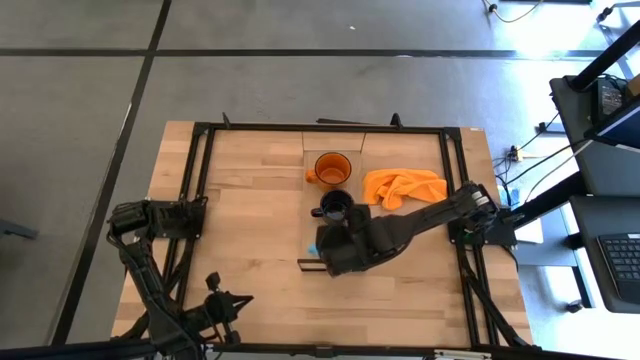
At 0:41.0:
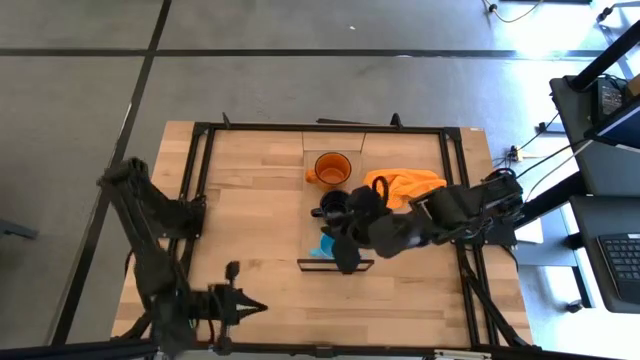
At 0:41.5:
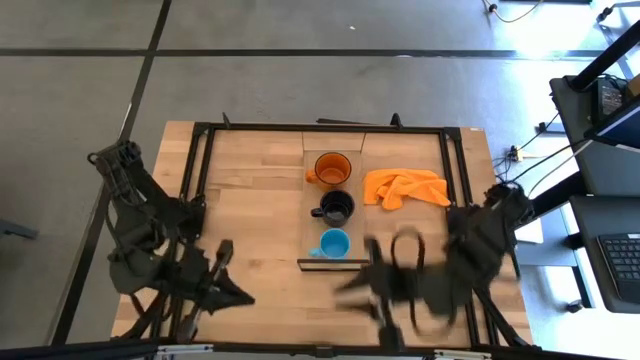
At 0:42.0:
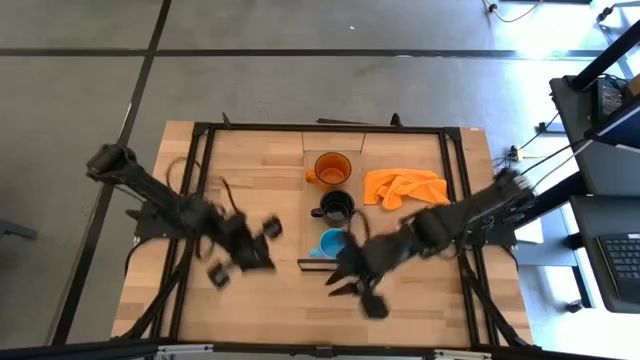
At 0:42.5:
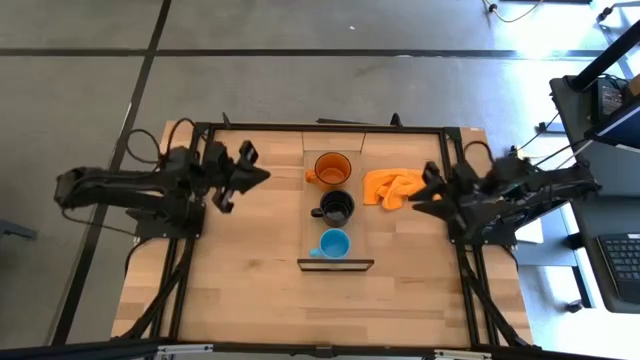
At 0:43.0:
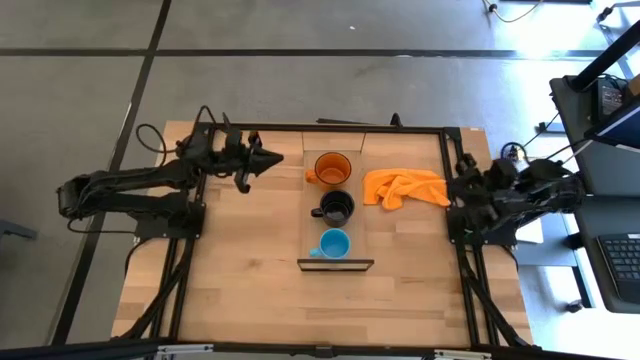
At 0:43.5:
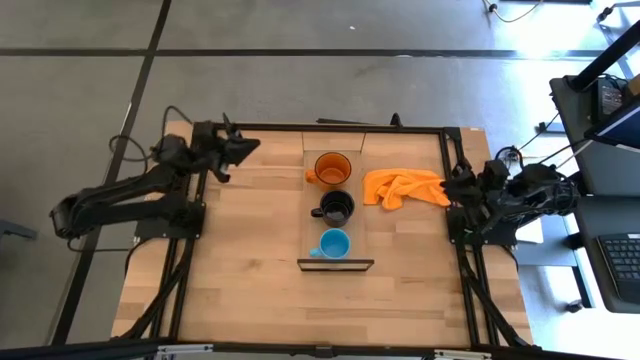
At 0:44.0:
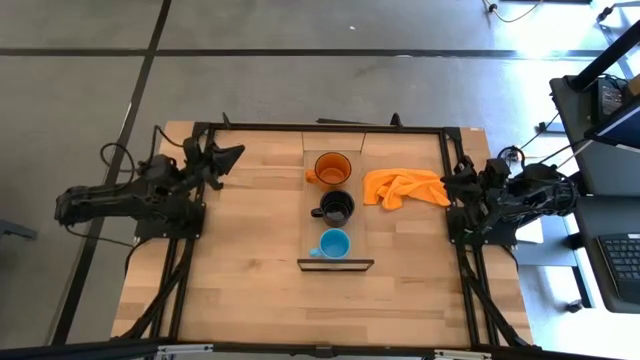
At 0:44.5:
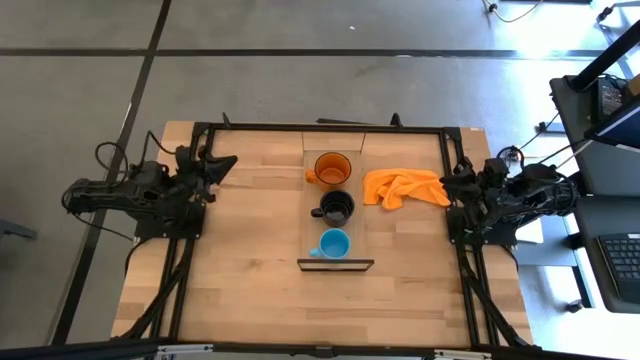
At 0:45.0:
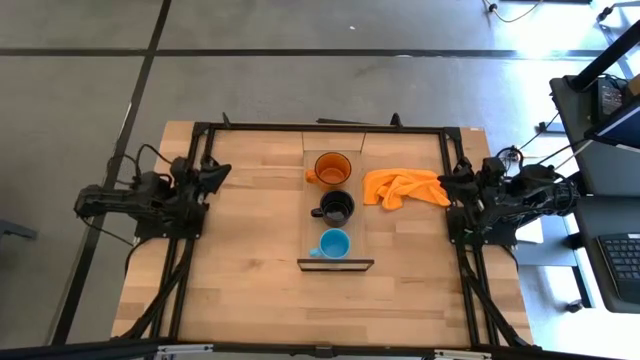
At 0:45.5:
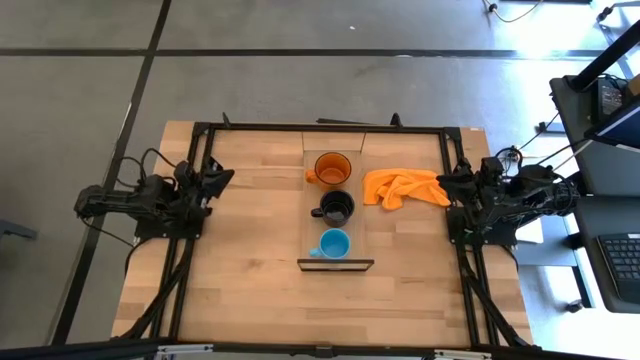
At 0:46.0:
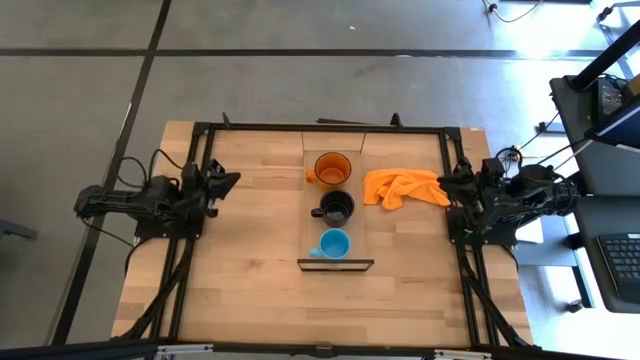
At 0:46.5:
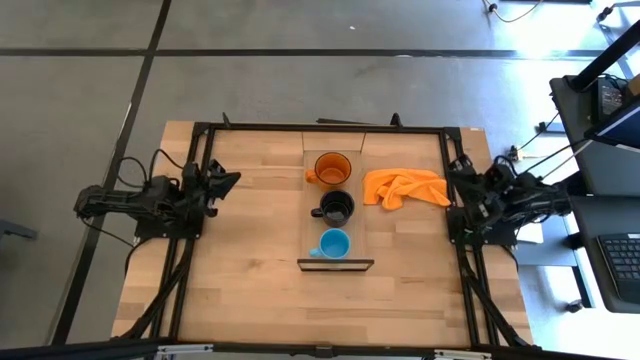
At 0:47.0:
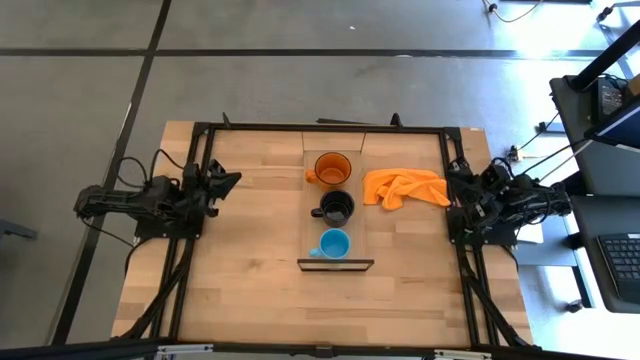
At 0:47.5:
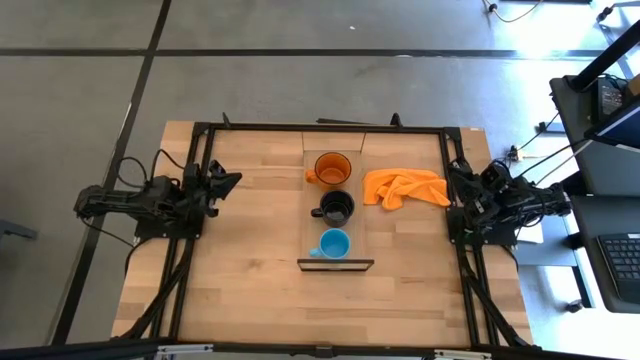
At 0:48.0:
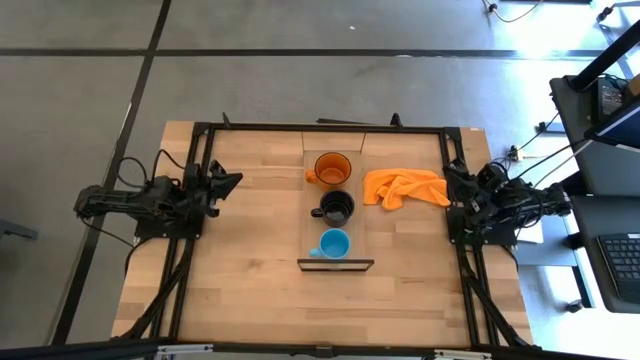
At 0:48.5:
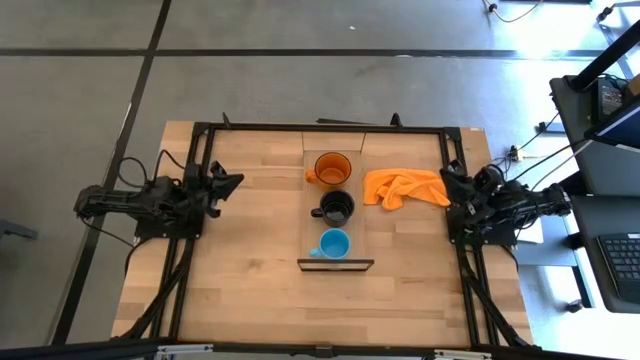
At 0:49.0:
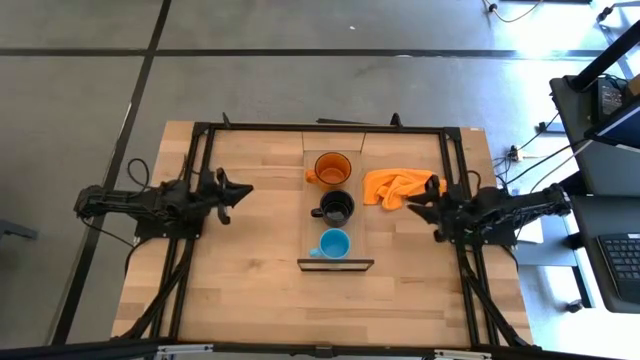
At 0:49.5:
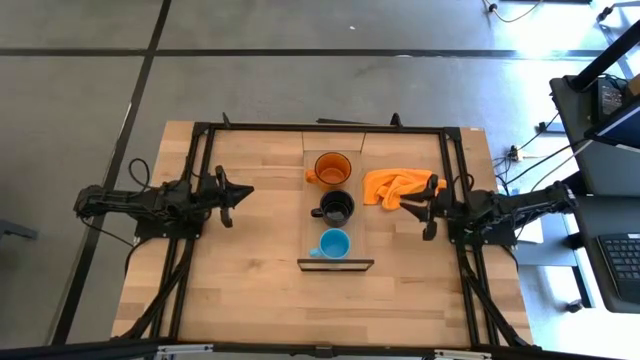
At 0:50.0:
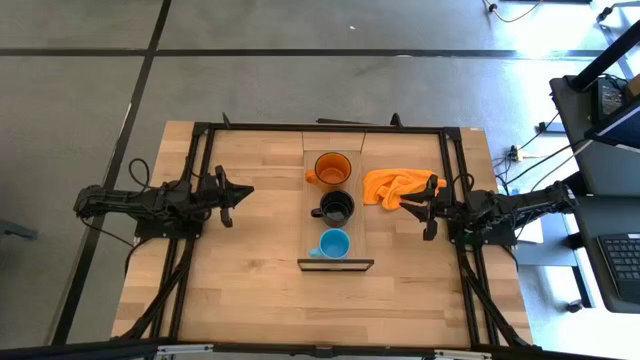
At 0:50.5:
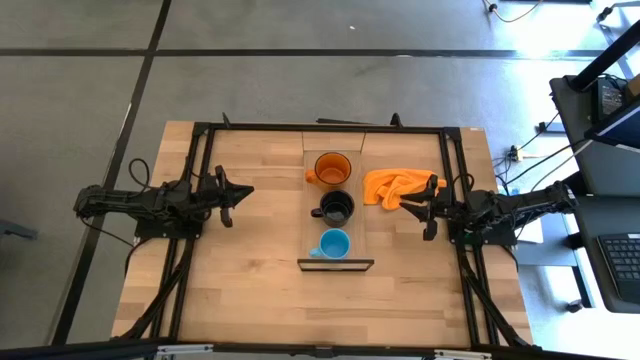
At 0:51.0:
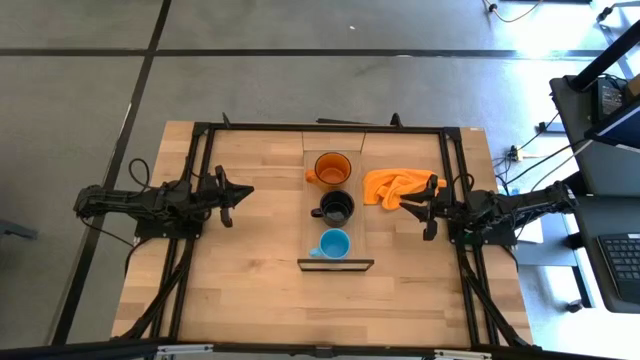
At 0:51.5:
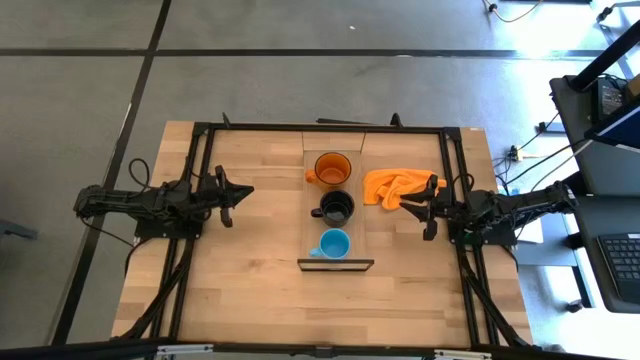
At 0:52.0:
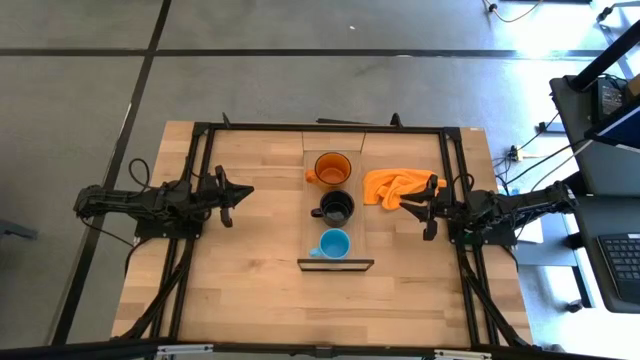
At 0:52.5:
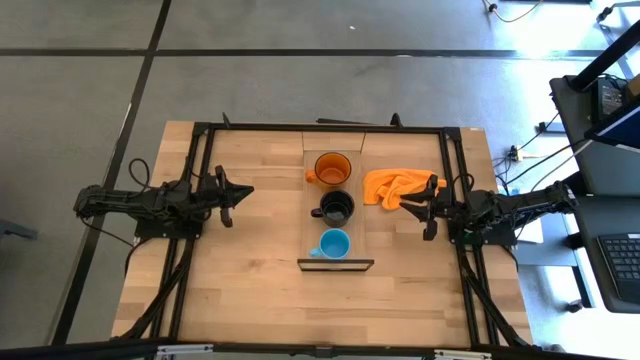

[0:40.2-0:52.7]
Task: Stack small to large cups/mugs on shelf
Return to Home Position
